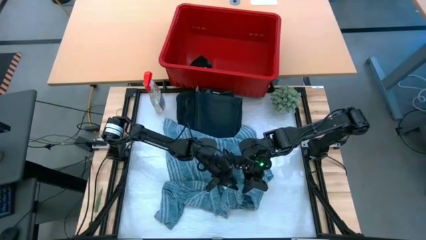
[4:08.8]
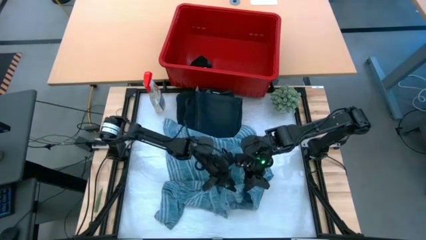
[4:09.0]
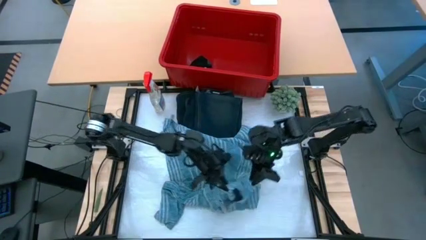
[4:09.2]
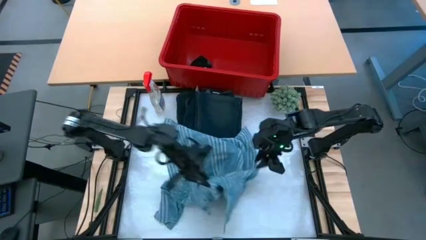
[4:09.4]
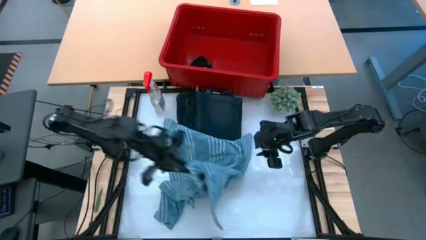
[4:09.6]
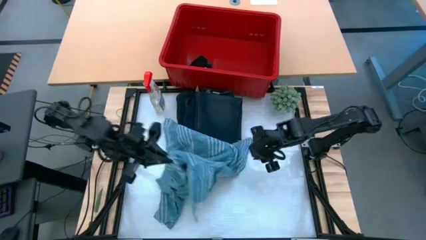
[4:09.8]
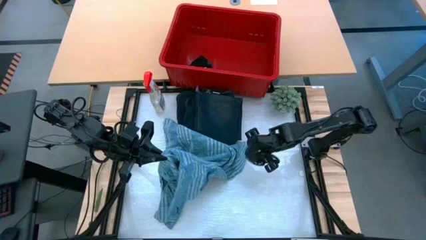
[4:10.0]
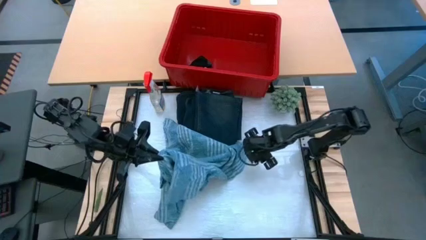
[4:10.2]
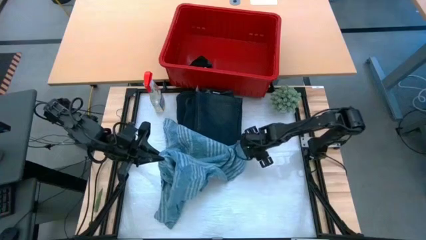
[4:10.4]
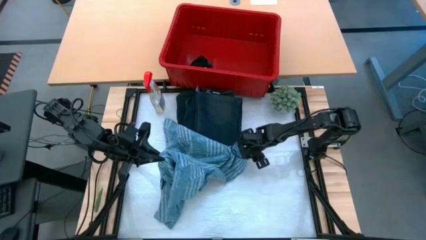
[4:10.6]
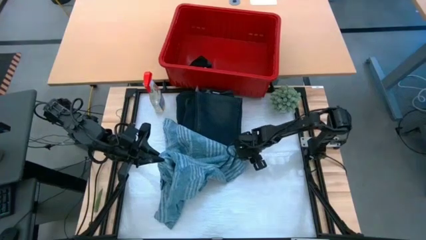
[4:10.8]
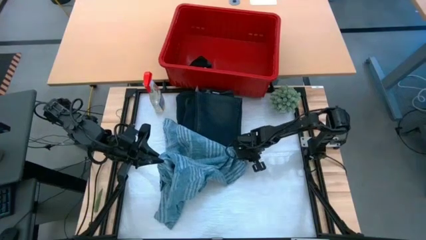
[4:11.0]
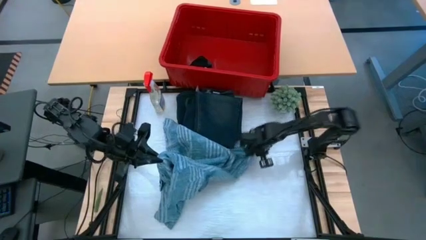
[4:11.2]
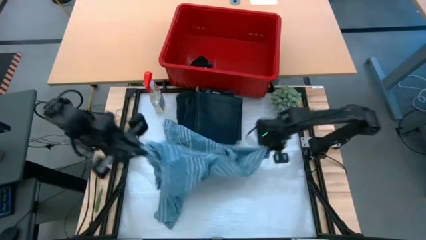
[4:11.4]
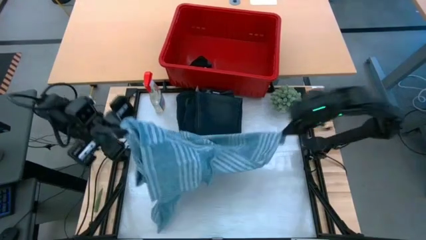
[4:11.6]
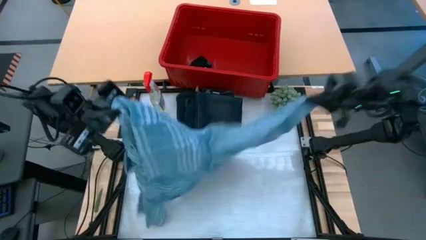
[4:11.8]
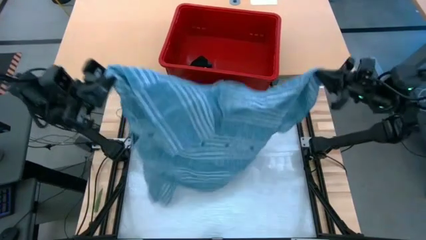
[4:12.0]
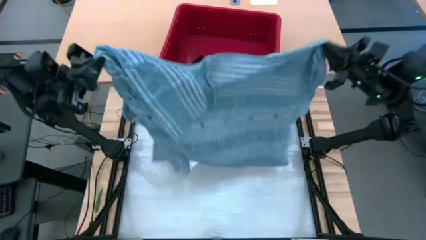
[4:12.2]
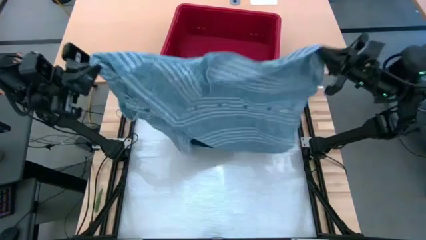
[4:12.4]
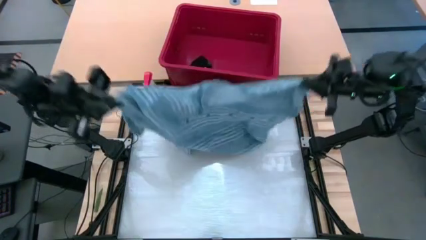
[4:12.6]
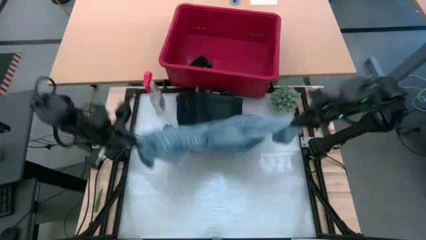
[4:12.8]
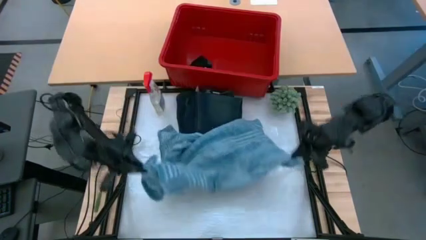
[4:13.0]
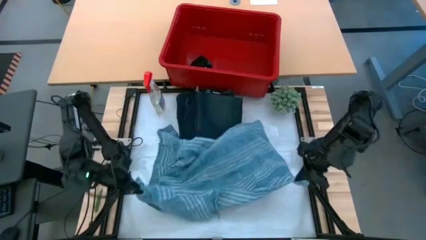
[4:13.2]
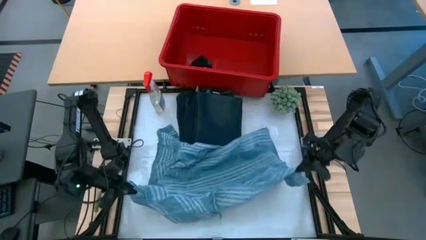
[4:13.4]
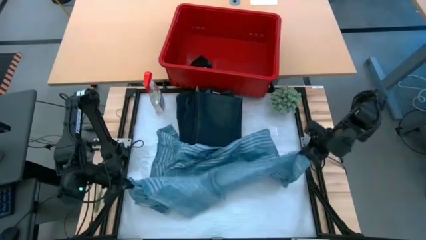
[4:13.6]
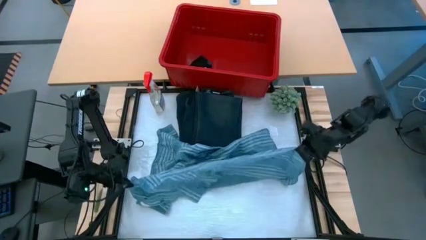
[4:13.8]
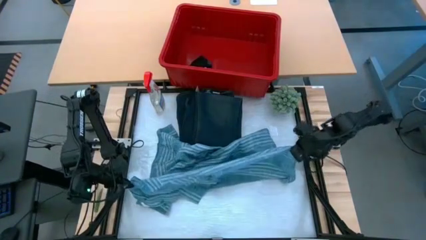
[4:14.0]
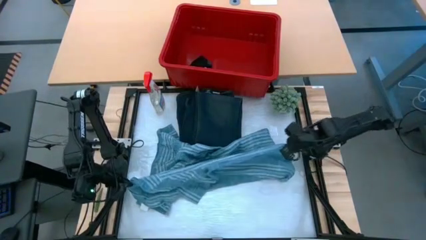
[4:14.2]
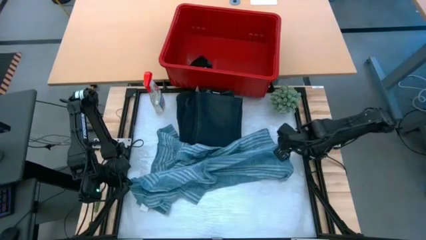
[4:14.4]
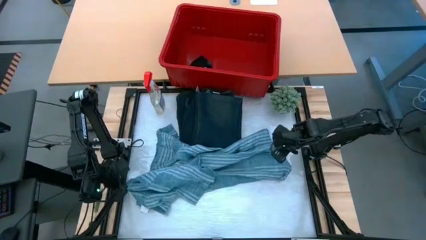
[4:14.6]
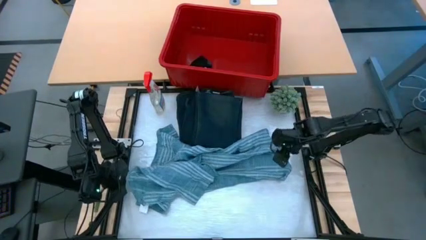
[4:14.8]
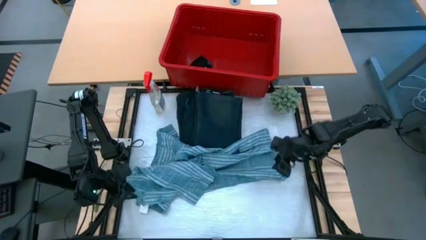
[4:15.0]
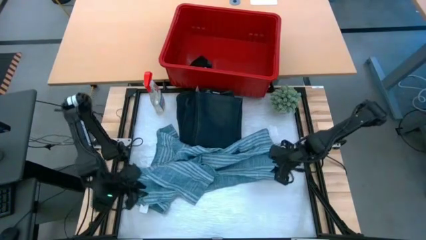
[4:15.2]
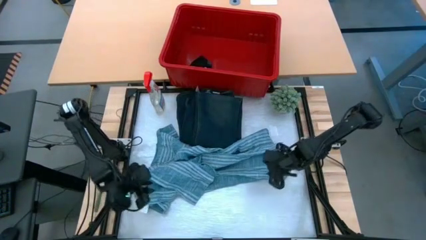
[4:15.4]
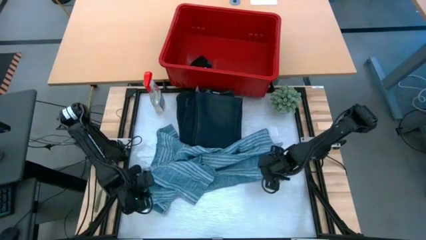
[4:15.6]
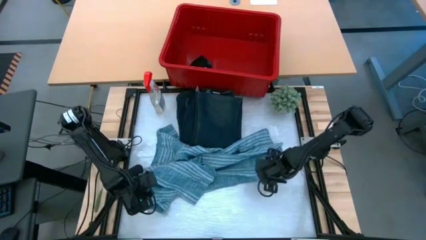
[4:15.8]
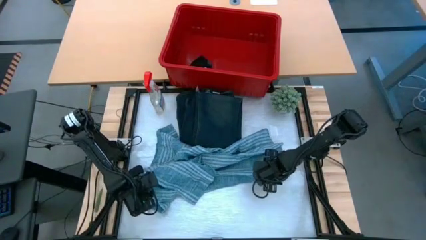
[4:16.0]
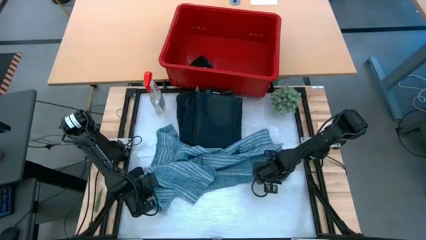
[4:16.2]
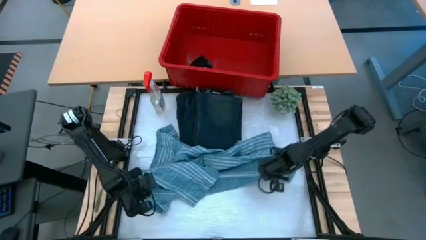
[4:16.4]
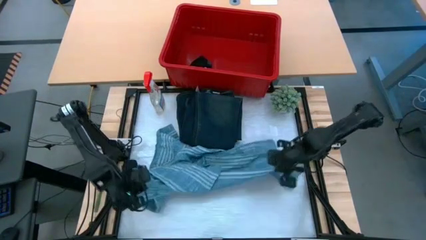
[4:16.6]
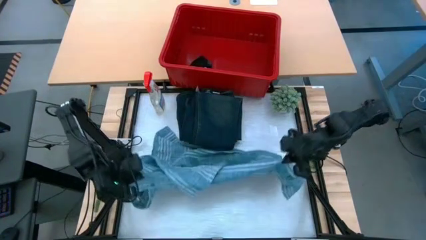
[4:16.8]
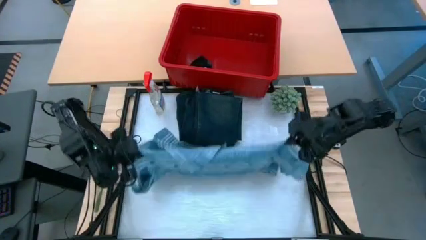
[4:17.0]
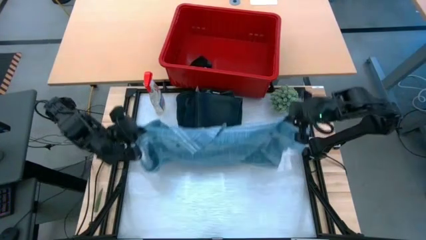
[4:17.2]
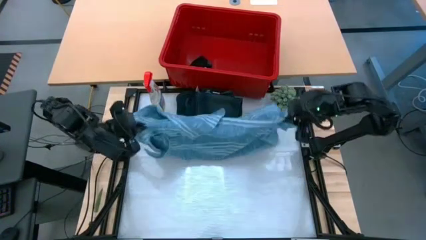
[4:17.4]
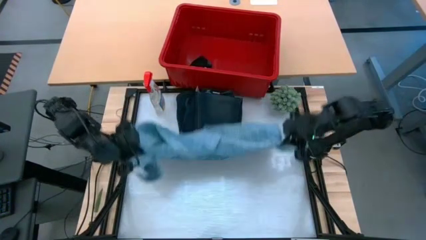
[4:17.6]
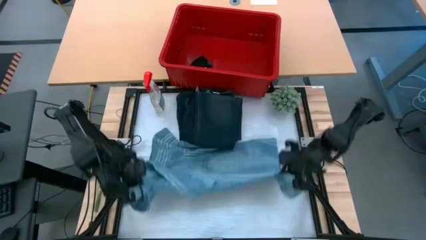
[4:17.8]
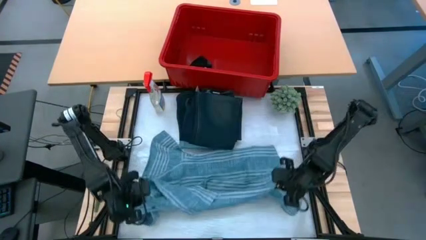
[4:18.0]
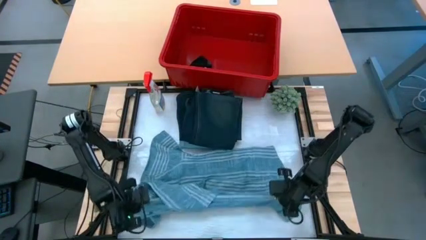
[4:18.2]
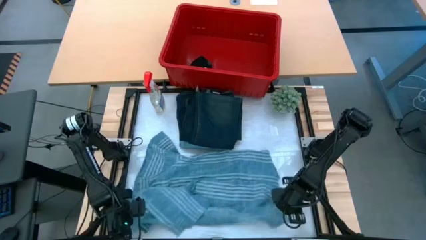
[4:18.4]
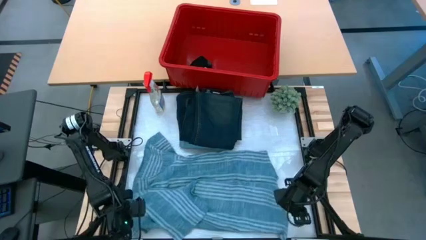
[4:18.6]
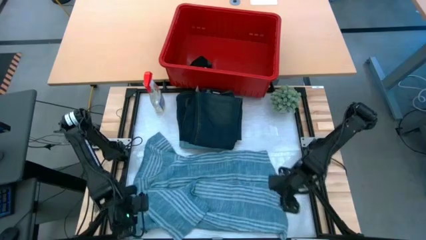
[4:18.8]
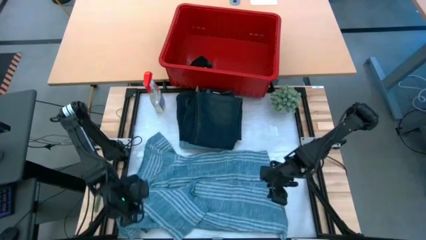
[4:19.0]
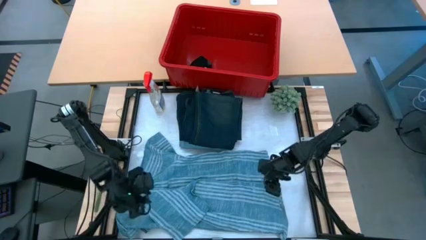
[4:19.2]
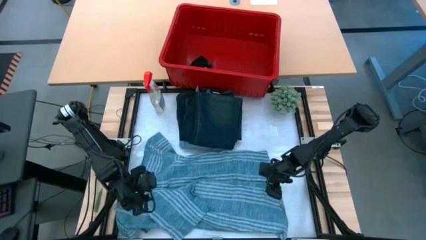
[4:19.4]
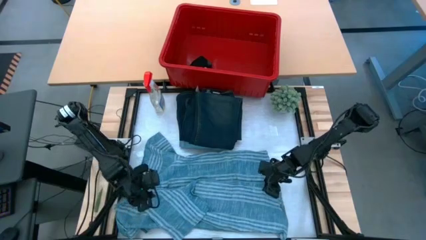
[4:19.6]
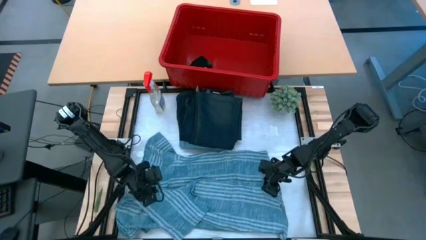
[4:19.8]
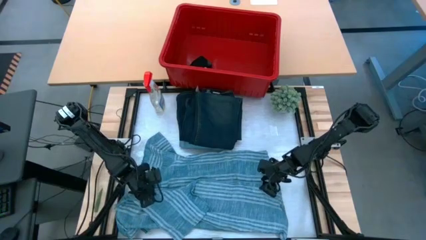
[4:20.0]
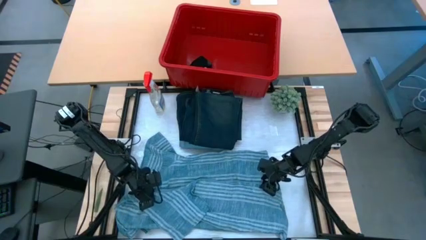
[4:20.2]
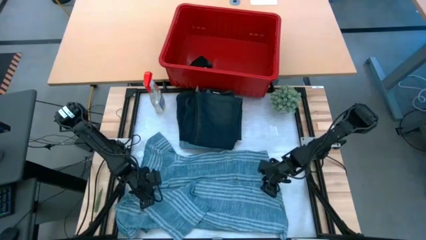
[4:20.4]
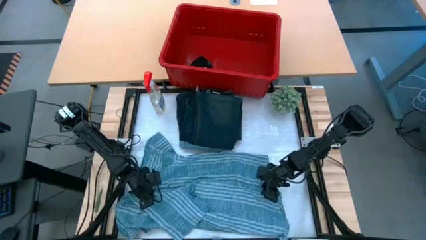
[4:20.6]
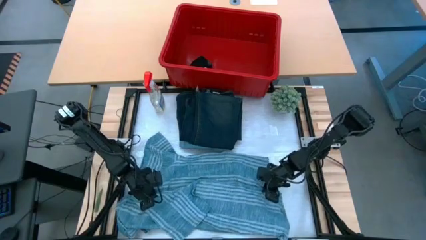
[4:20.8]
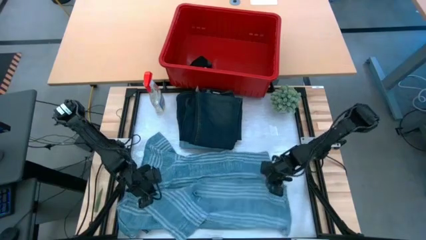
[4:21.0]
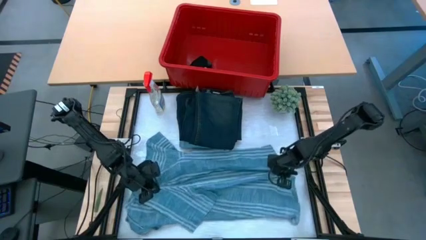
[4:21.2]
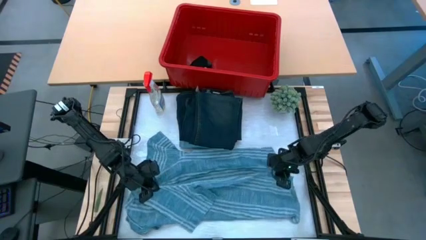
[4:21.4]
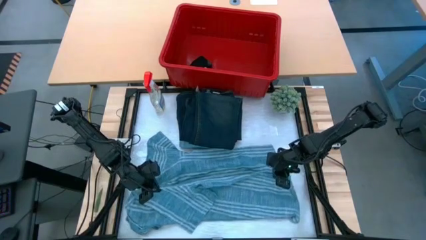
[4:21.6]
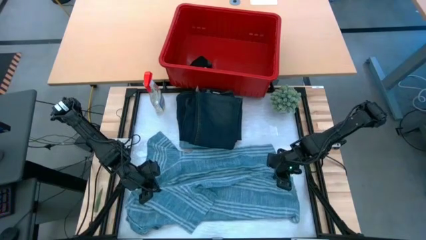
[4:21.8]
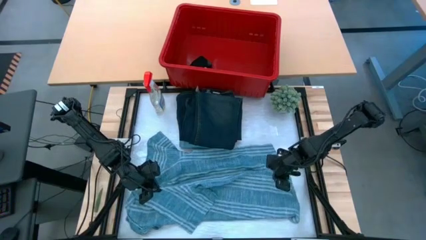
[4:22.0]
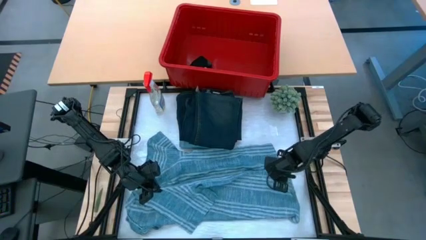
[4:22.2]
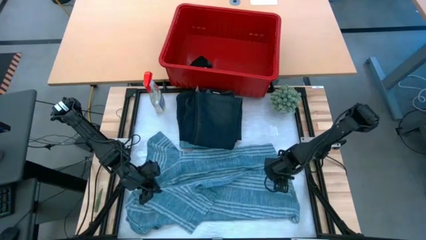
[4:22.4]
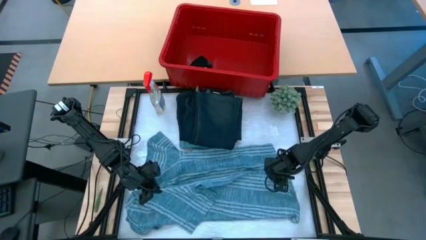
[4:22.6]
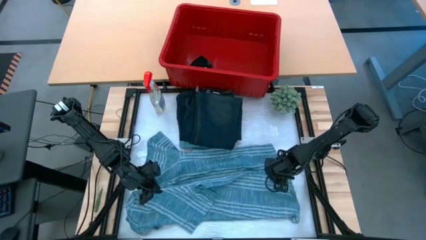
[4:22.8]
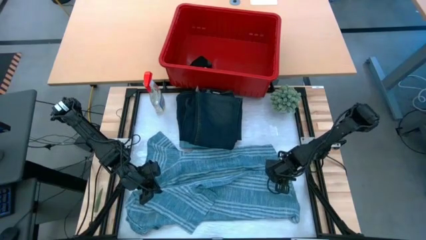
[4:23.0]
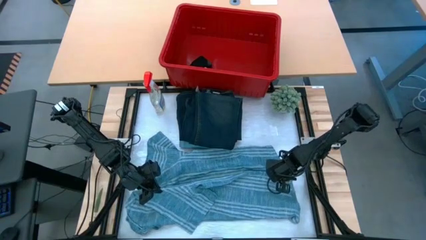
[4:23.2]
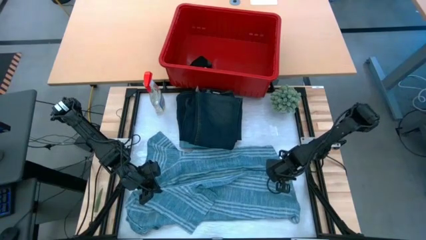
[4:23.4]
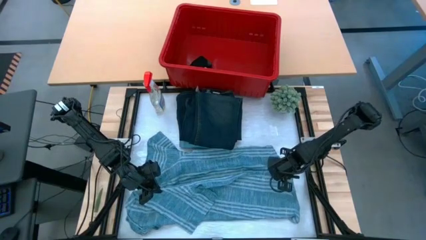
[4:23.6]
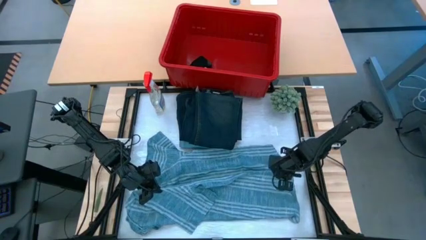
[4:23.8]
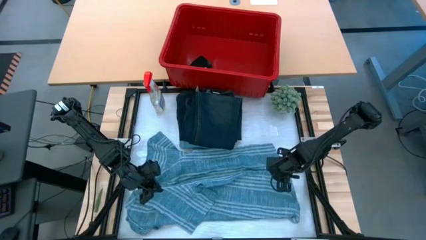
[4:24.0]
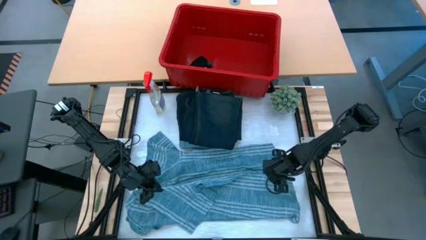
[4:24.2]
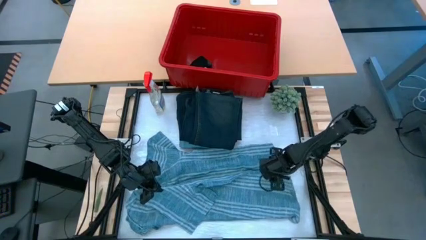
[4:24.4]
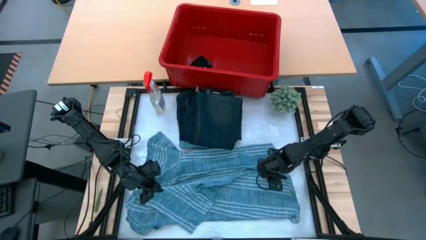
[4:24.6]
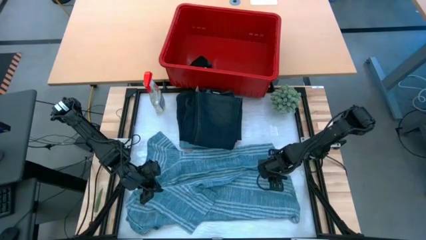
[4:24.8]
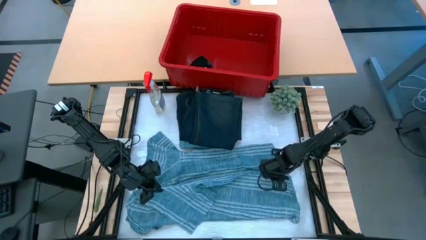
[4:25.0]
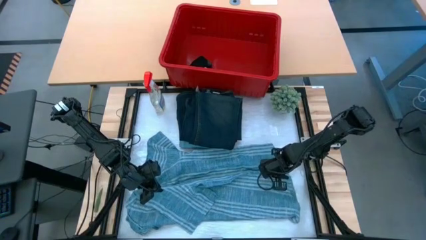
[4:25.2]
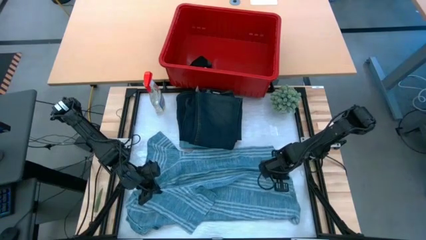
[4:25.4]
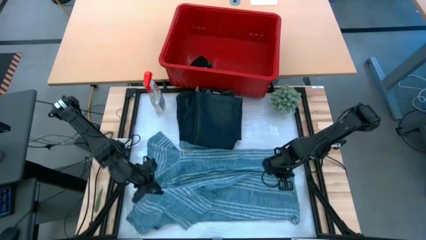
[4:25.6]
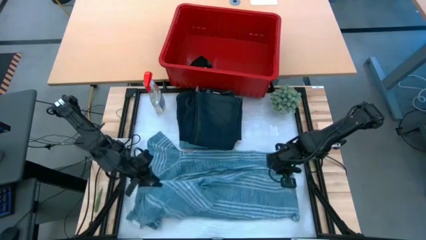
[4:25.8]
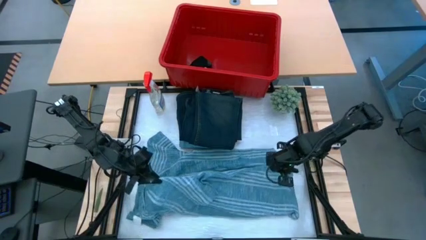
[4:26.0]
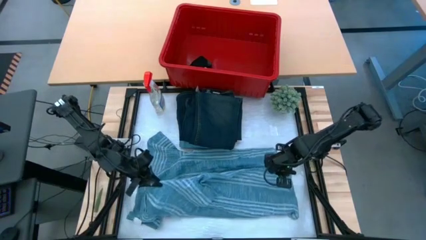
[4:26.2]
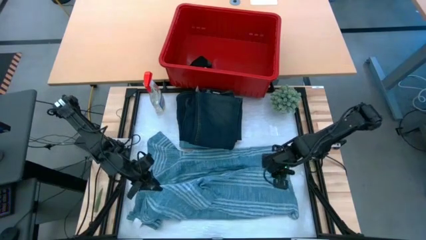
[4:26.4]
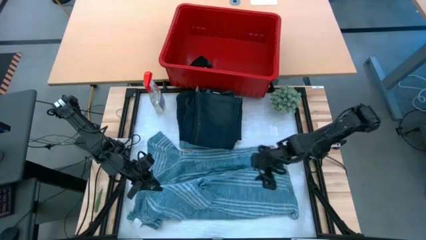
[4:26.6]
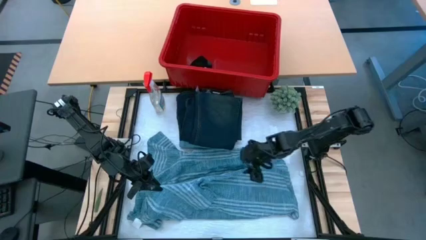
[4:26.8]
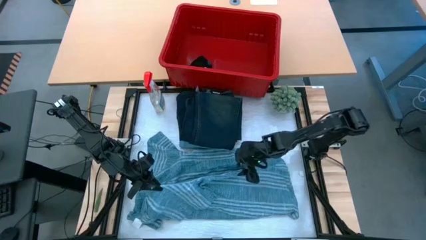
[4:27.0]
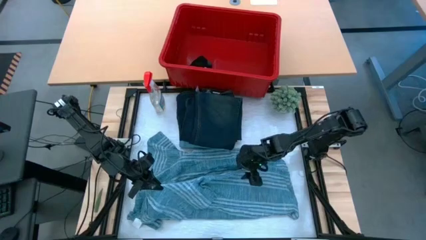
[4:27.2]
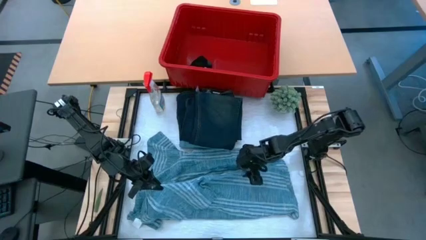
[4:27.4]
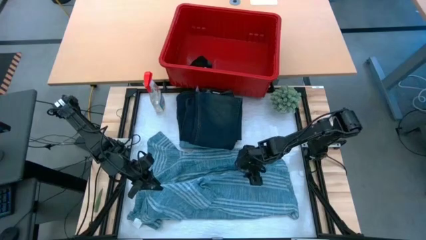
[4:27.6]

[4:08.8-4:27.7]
Task: Fold Laundry from Bin
Fold the blue long sleeve on the table
